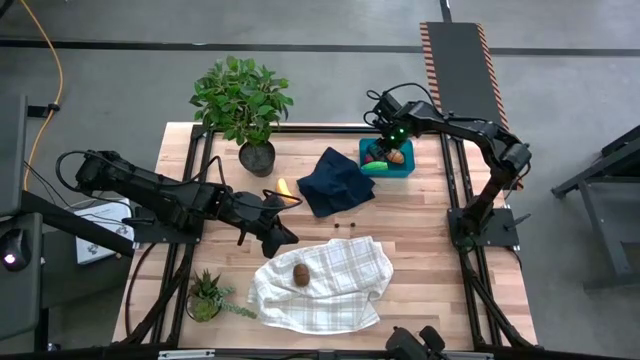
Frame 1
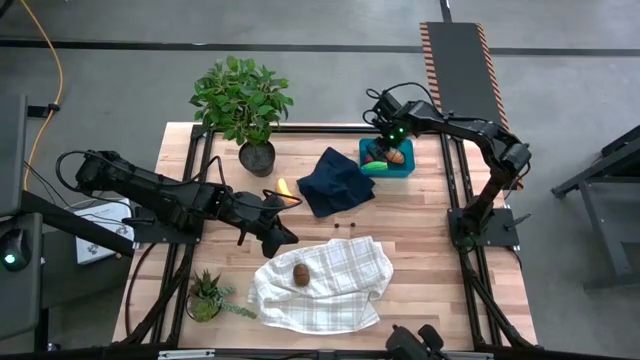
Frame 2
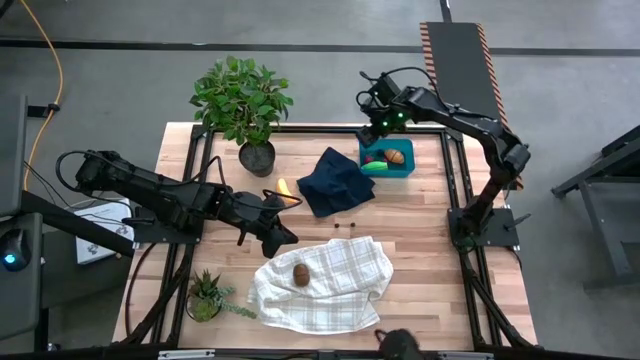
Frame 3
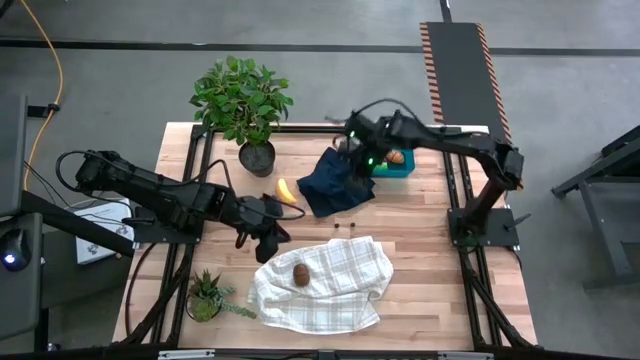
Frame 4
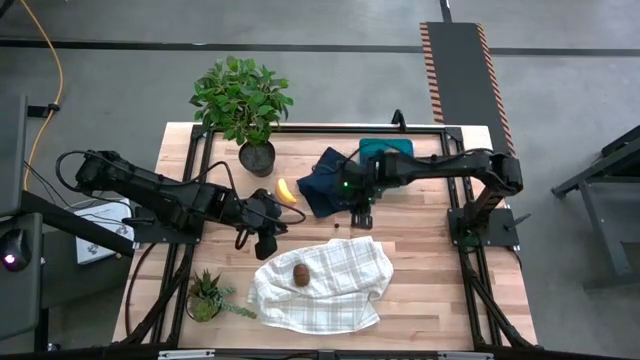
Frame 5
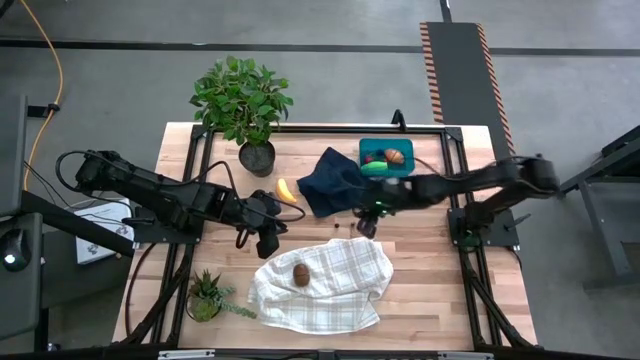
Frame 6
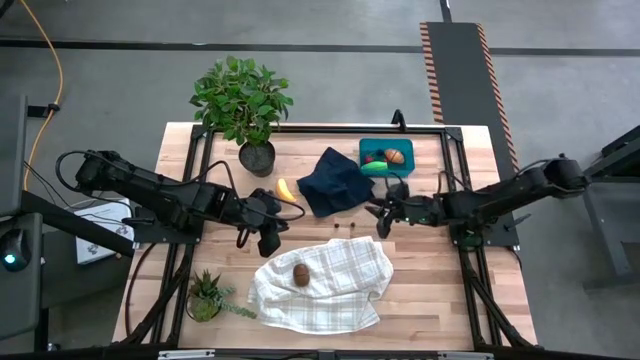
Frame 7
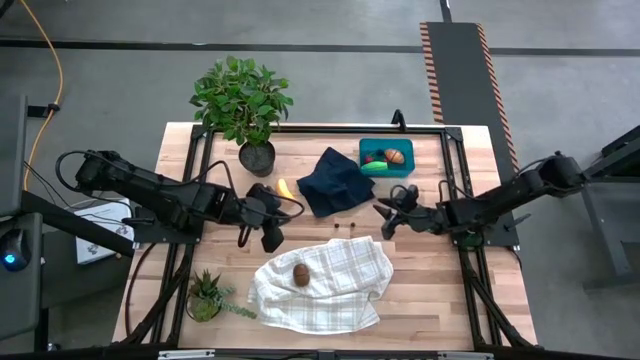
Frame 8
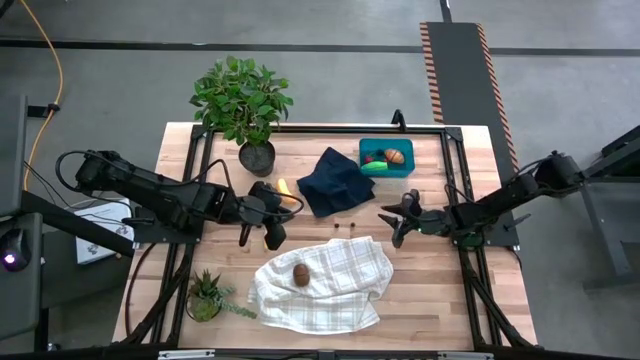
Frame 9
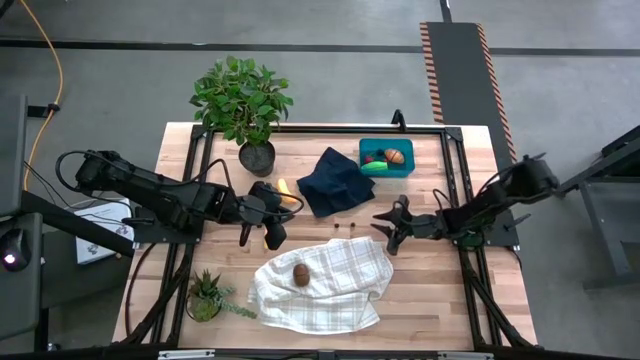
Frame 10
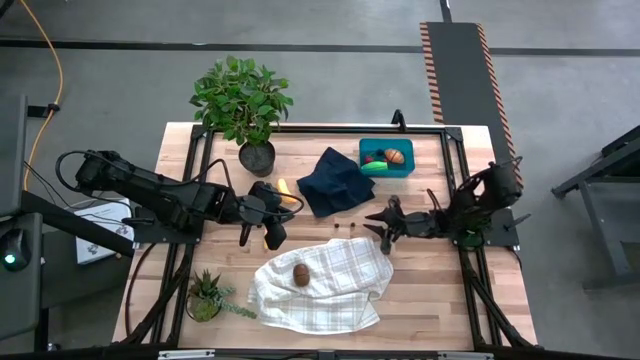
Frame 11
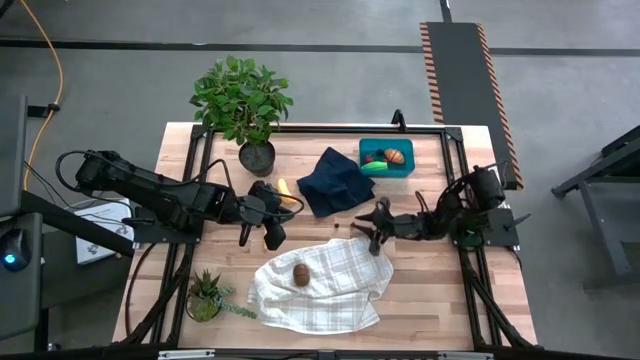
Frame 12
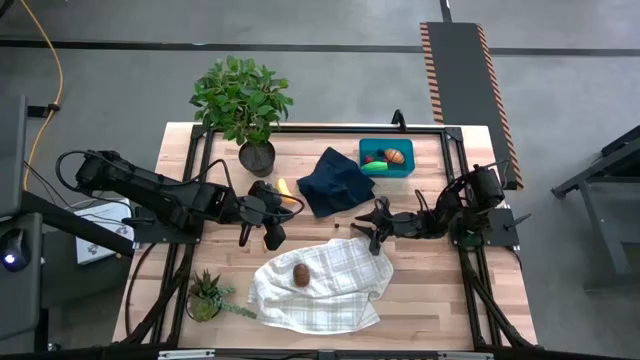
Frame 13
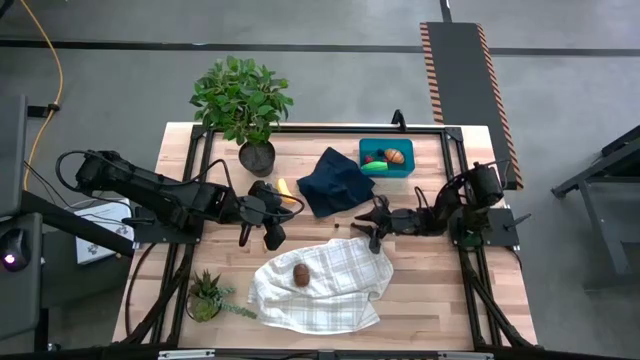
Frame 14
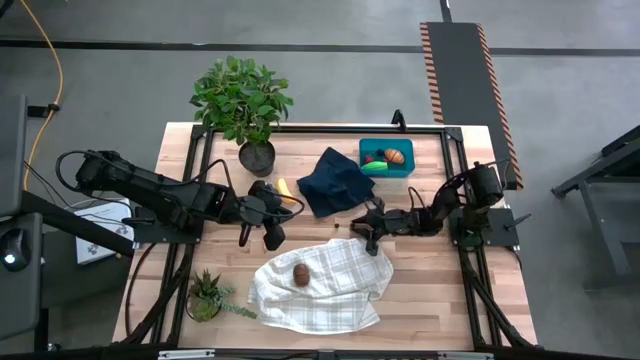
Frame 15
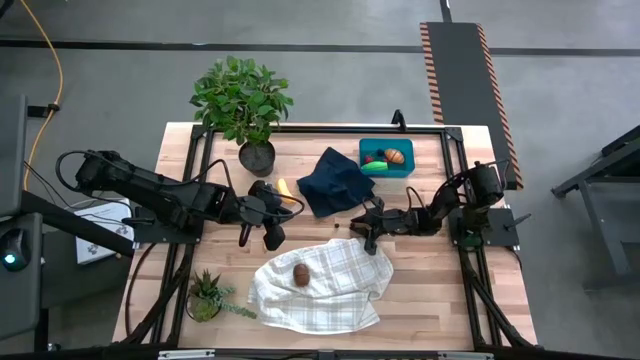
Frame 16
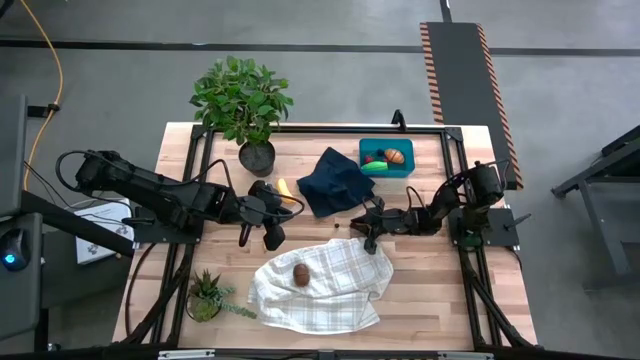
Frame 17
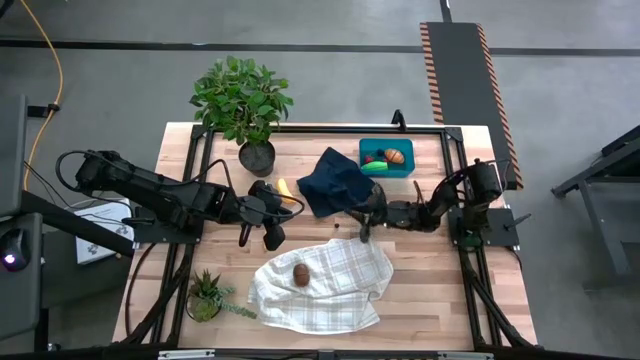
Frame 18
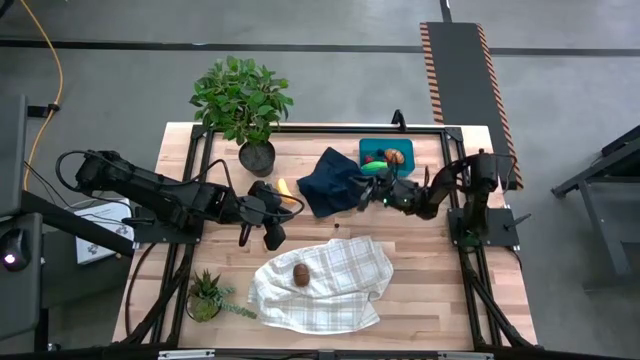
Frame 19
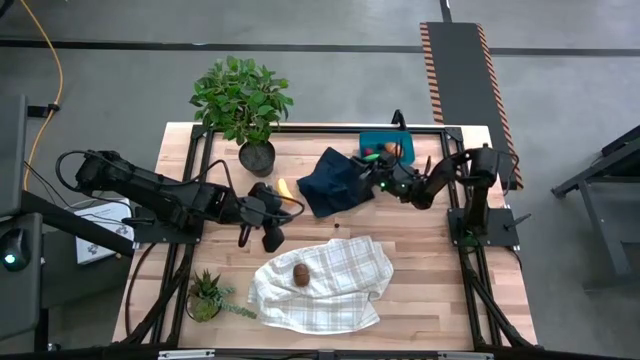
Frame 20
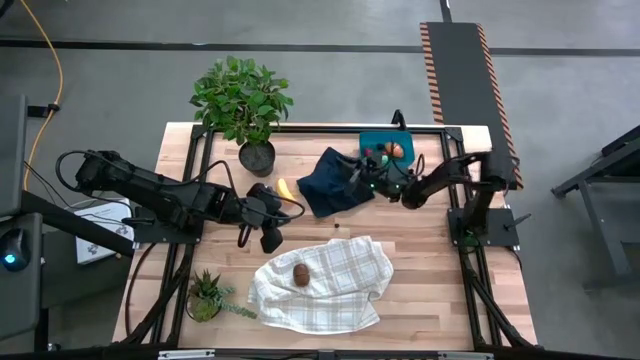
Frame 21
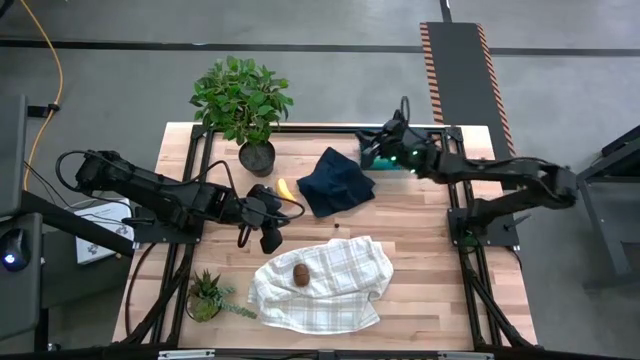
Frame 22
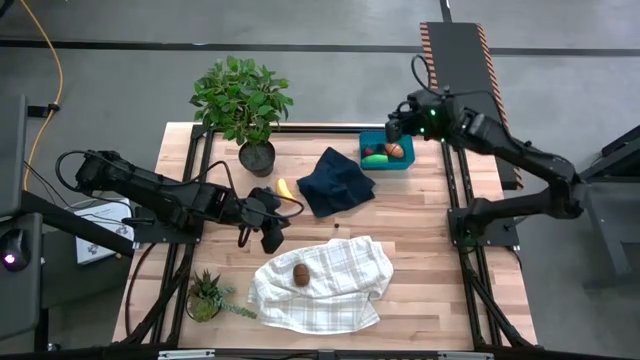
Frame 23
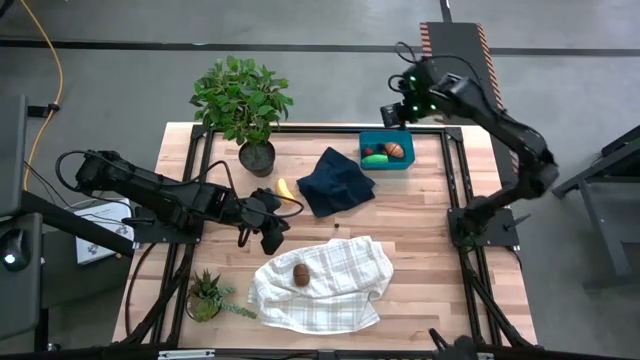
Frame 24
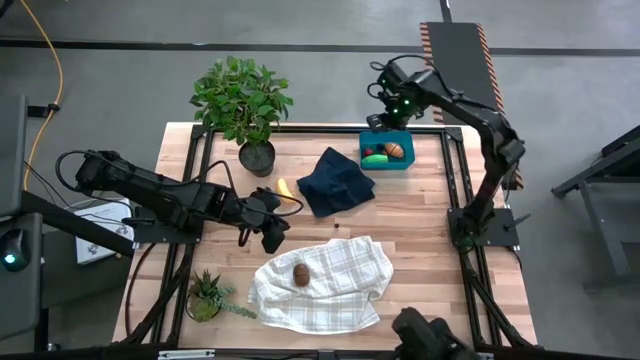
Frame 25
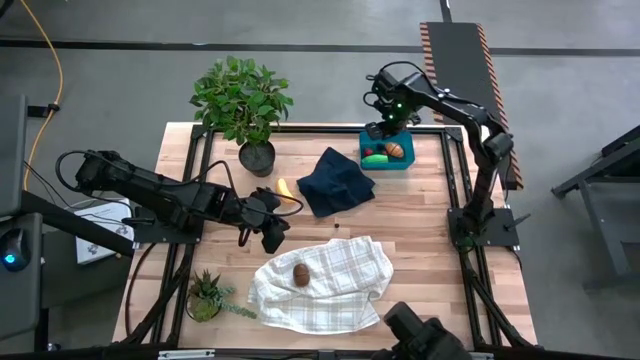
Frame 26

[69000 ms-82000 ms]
Task: Pick and placing Produce into tupperware
Put the right blueberry into the blue bin

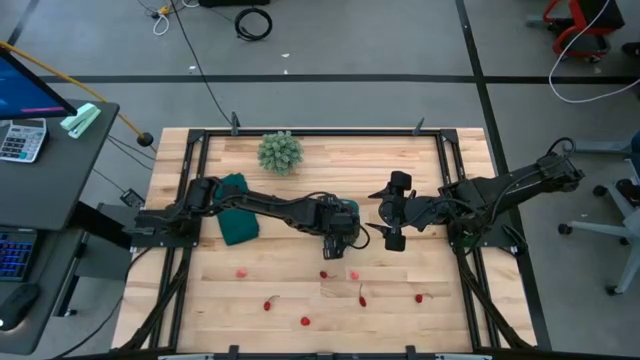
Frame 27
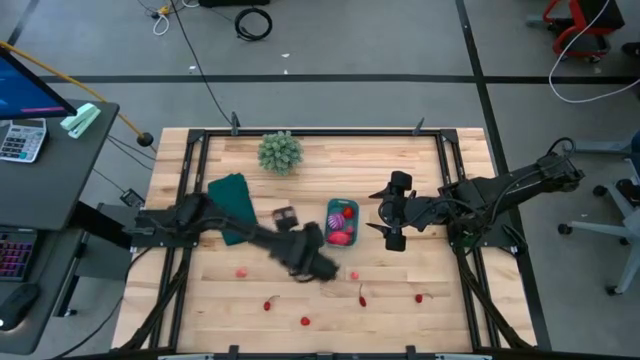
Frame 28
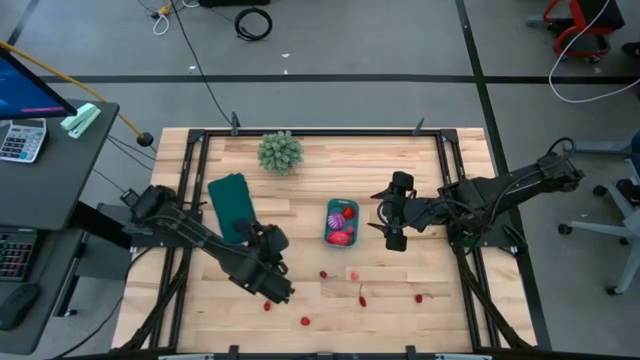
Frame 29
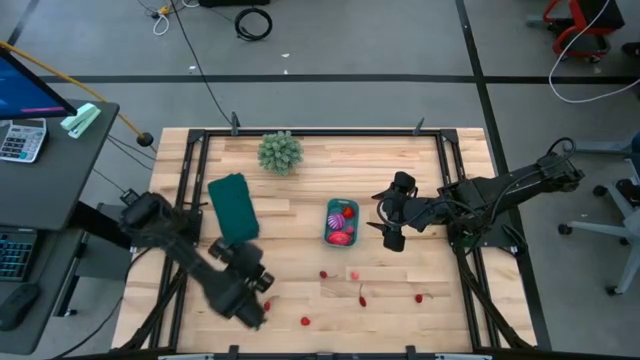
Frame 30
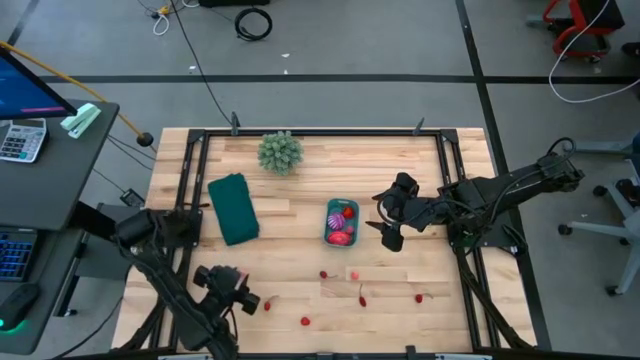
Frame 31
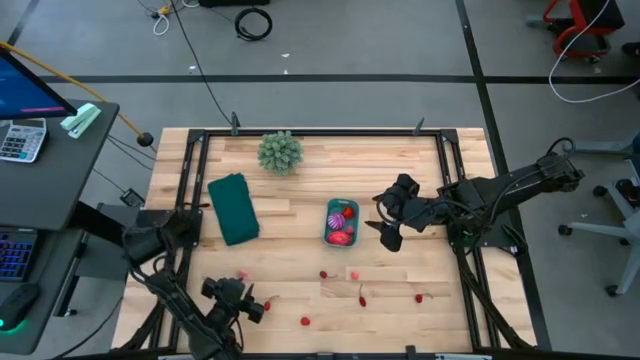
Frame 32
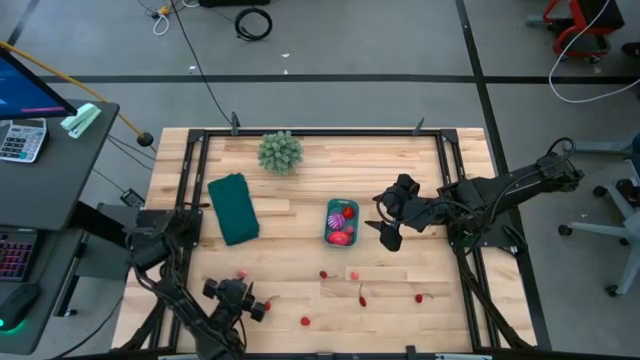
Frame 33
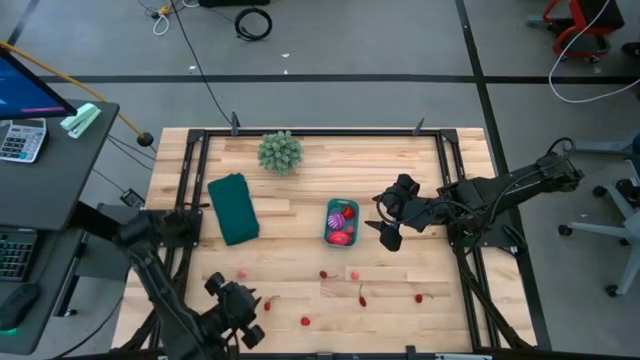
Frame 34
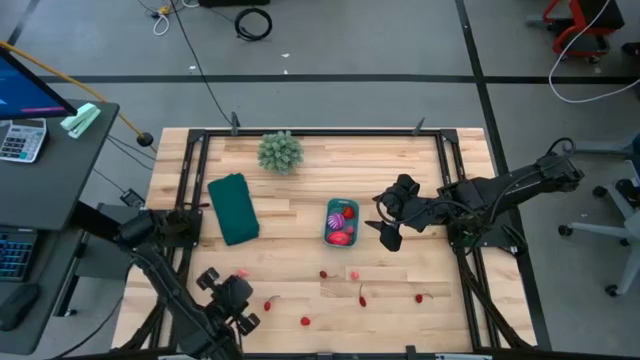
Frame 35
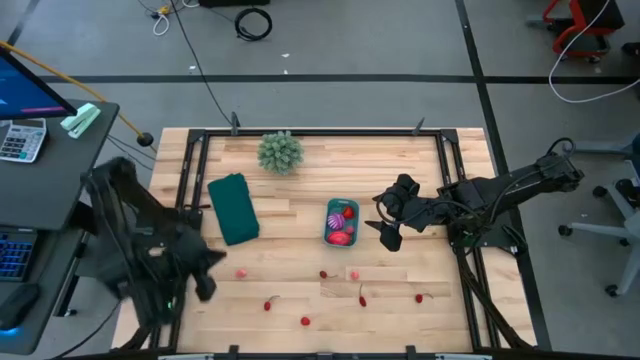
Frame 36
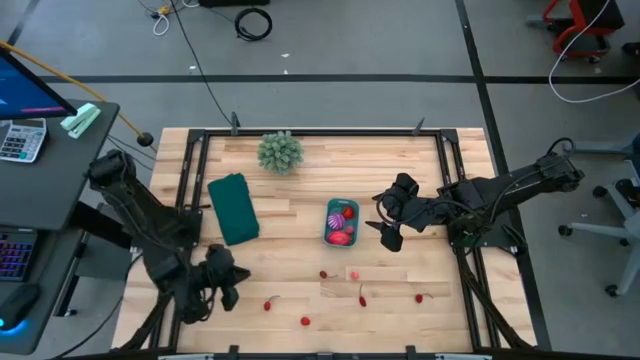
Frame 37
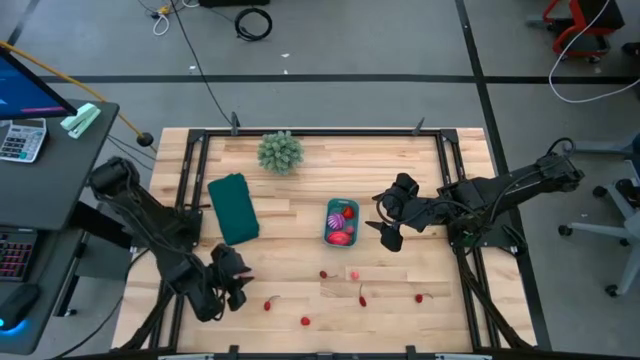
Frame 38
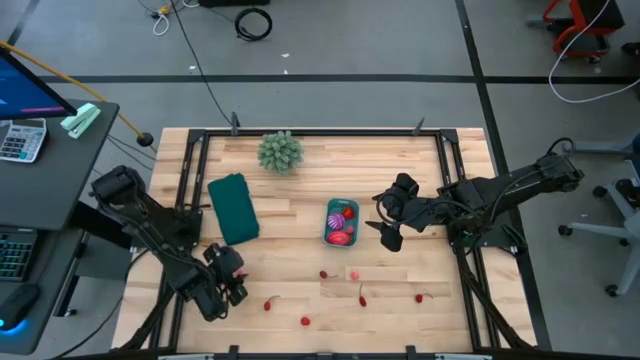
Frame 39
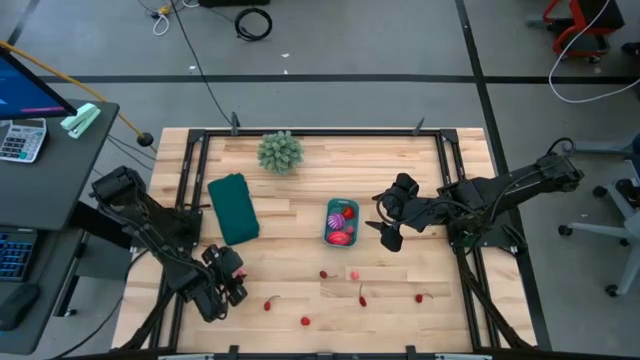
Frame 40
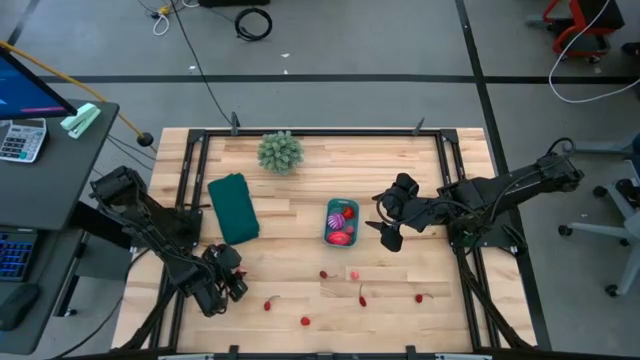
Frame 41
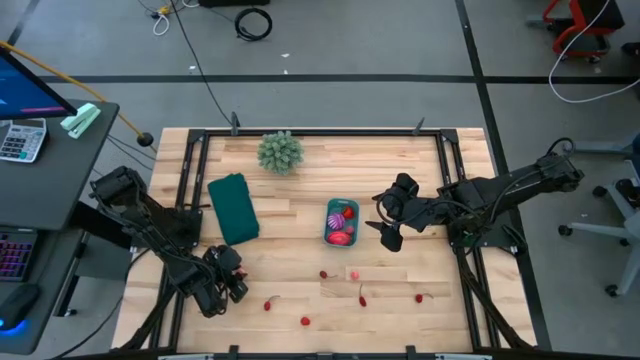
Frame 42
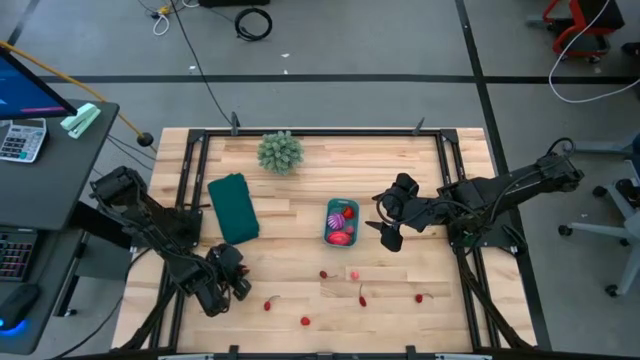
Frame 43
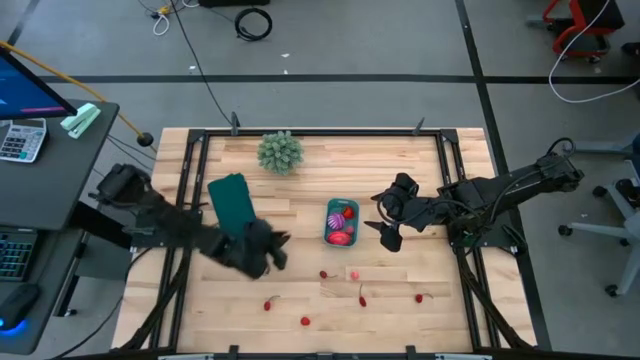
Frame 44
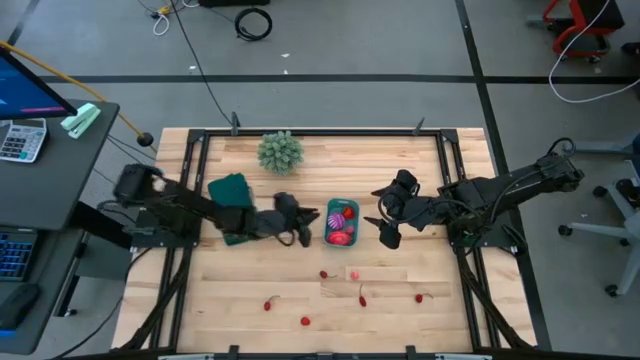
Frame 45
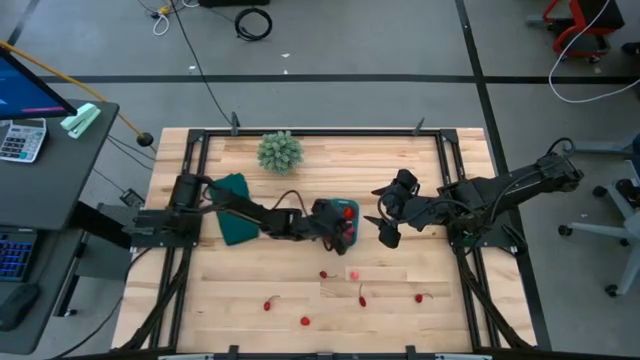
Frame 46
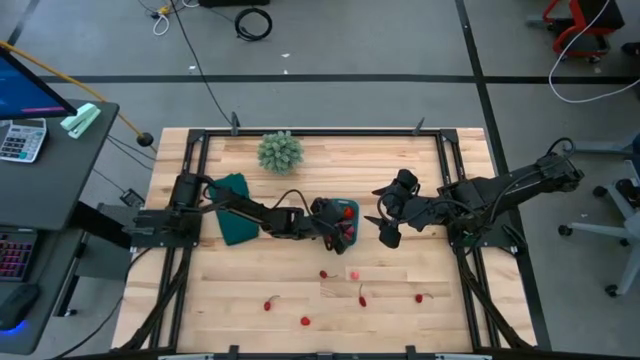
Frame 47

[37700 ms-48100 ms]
Task: Pick and placing Produce into tupperware
Put the pink peach into the blue bin
